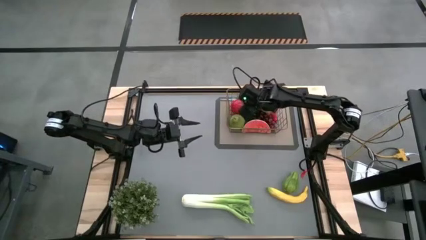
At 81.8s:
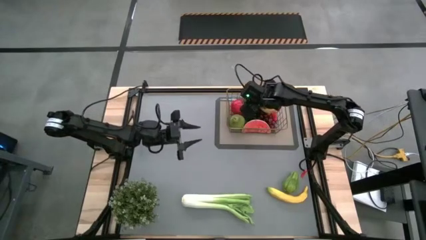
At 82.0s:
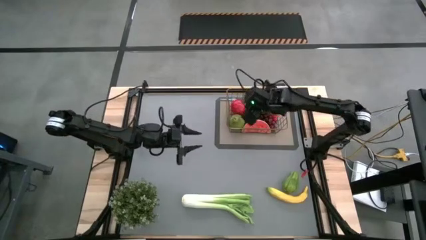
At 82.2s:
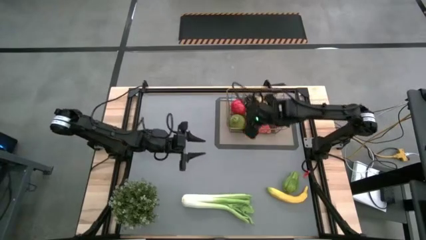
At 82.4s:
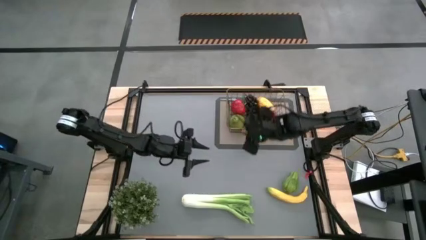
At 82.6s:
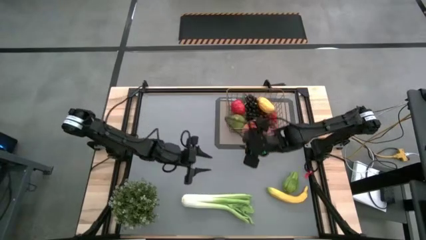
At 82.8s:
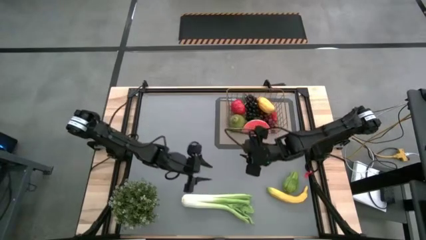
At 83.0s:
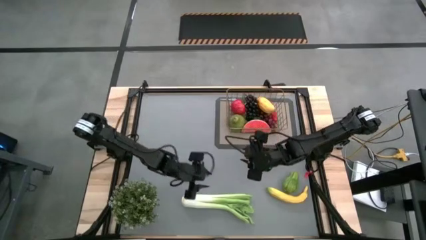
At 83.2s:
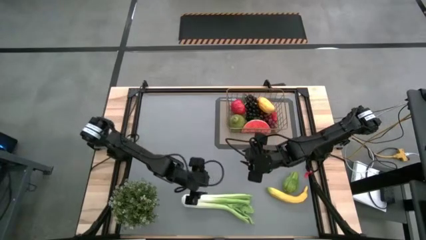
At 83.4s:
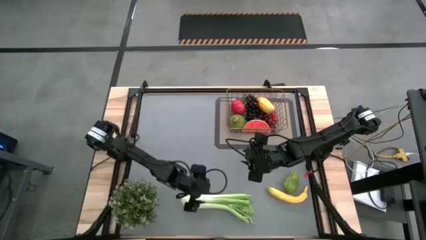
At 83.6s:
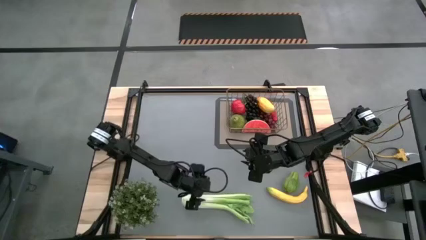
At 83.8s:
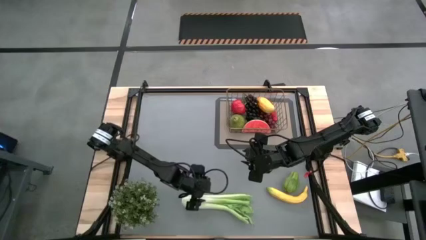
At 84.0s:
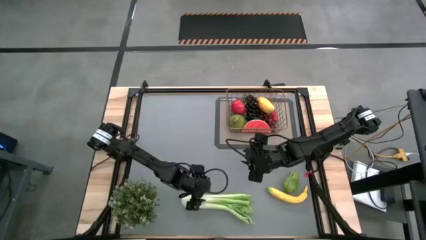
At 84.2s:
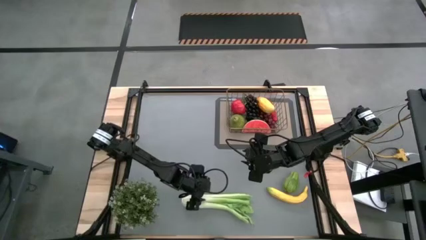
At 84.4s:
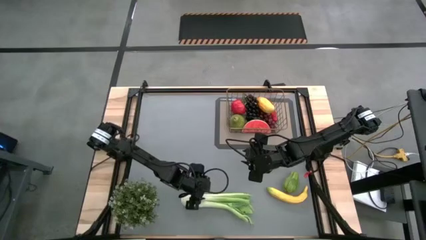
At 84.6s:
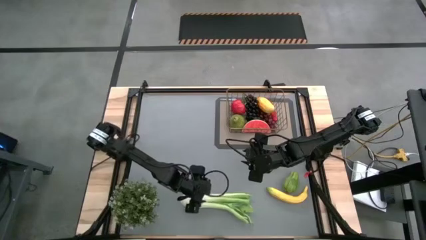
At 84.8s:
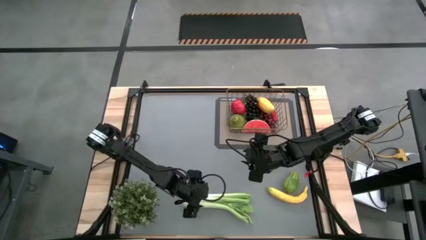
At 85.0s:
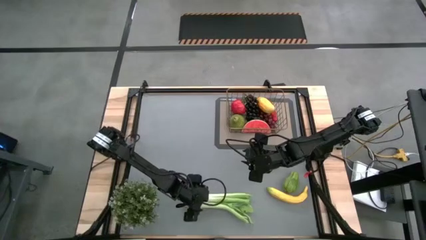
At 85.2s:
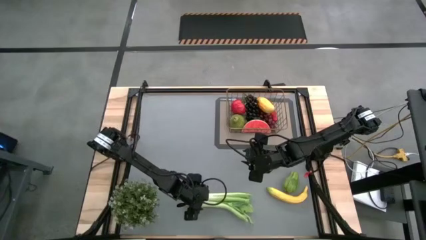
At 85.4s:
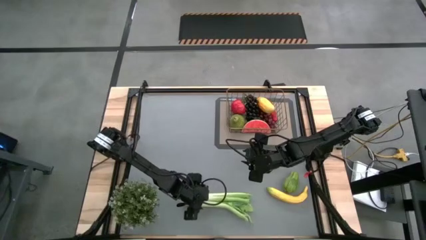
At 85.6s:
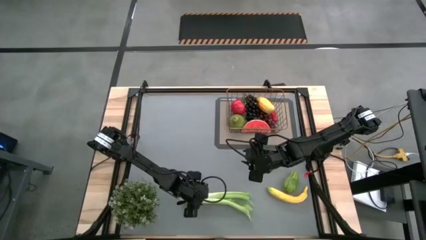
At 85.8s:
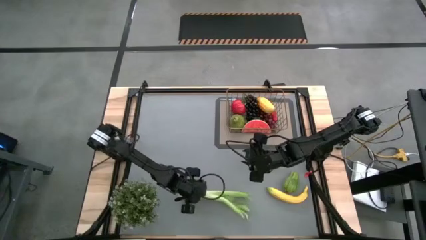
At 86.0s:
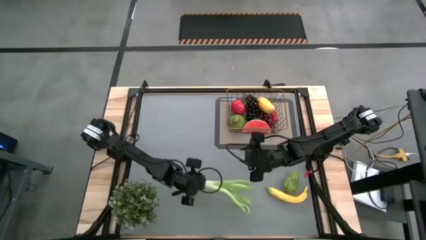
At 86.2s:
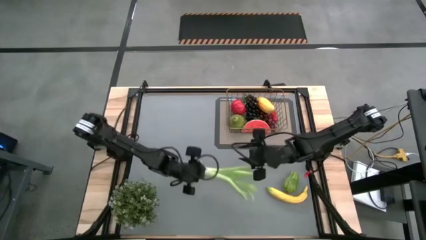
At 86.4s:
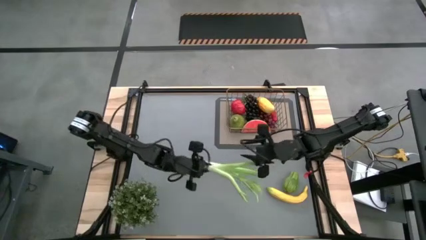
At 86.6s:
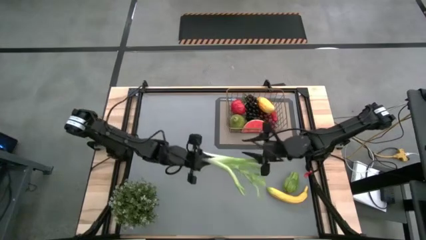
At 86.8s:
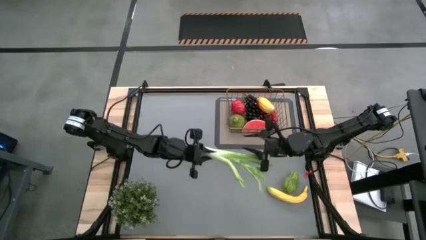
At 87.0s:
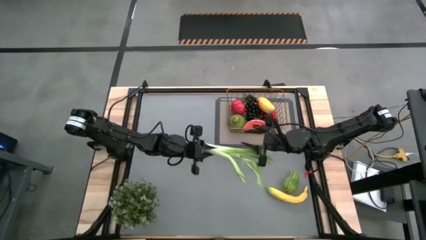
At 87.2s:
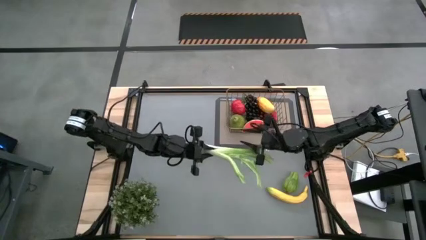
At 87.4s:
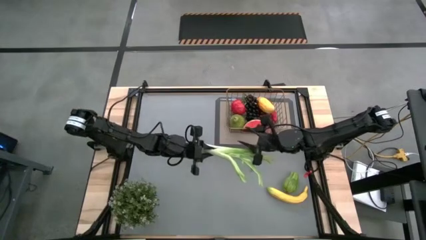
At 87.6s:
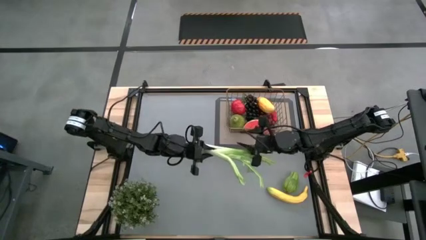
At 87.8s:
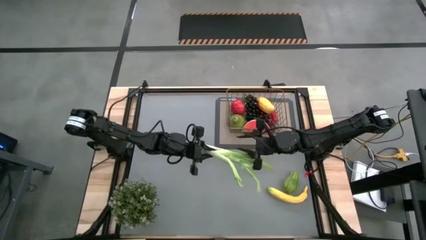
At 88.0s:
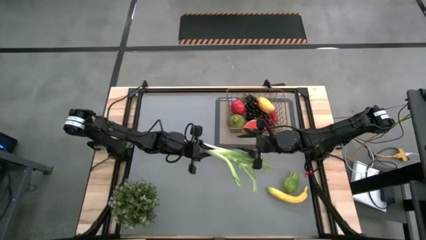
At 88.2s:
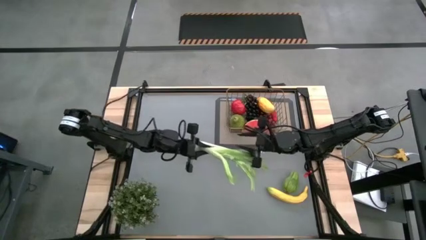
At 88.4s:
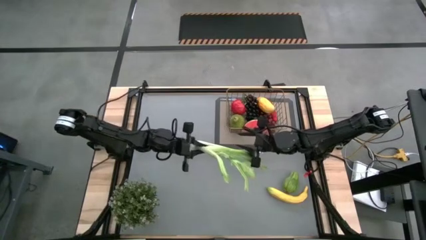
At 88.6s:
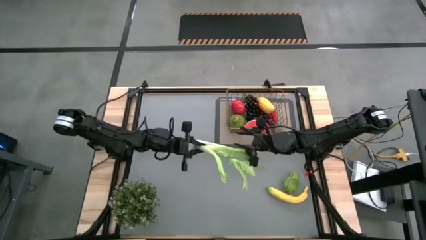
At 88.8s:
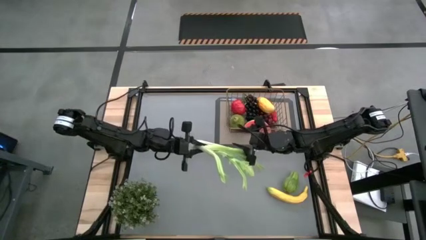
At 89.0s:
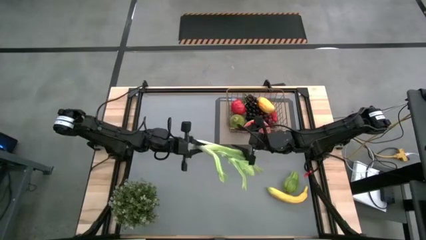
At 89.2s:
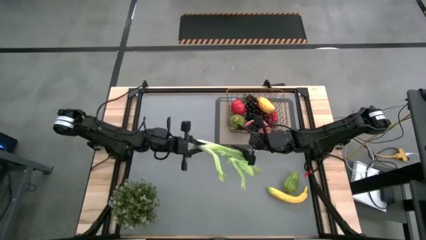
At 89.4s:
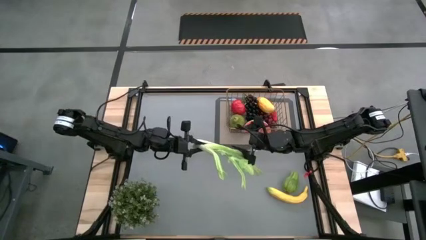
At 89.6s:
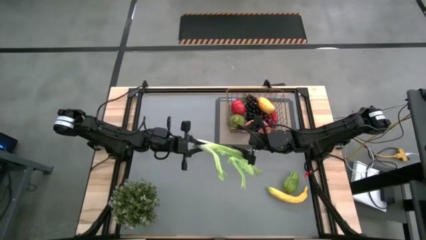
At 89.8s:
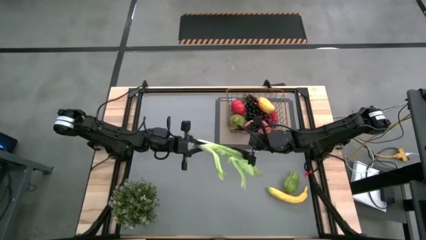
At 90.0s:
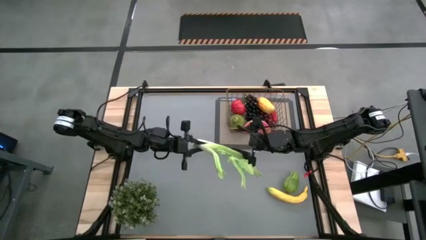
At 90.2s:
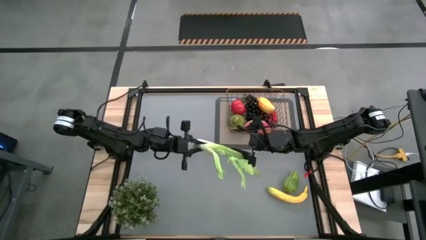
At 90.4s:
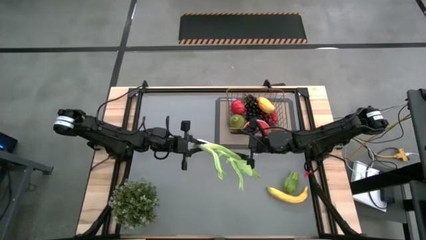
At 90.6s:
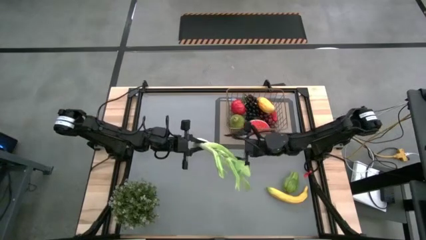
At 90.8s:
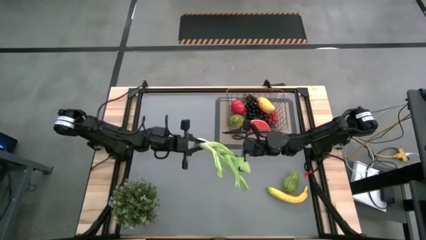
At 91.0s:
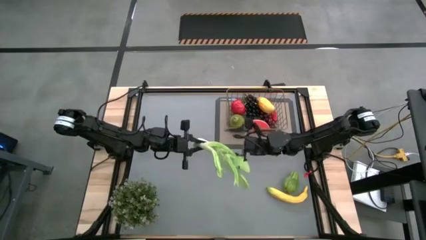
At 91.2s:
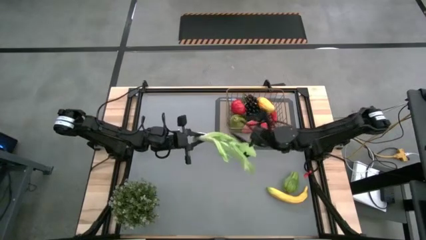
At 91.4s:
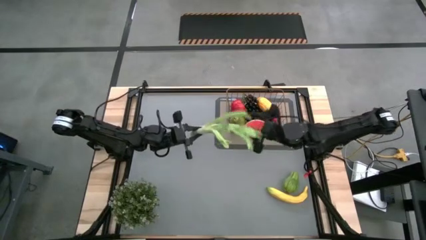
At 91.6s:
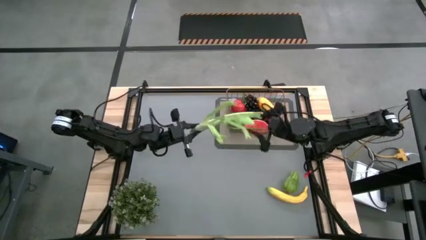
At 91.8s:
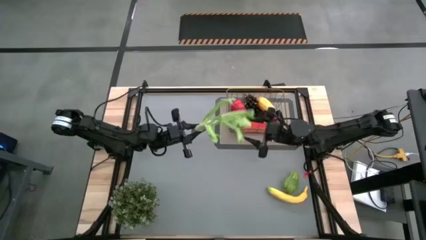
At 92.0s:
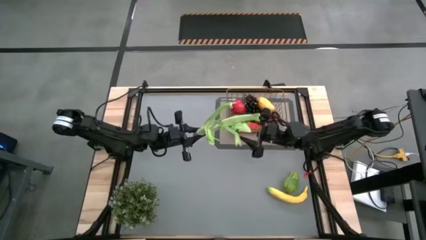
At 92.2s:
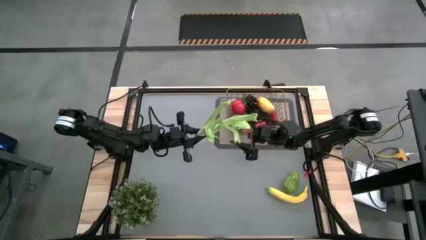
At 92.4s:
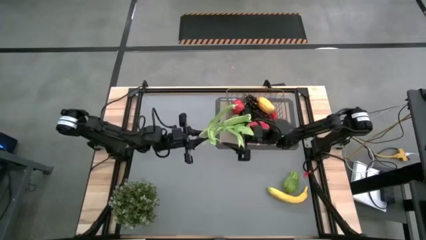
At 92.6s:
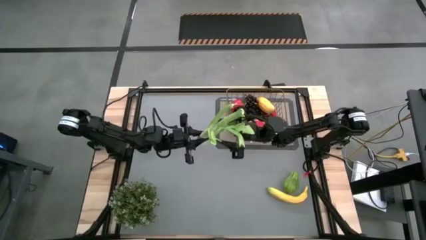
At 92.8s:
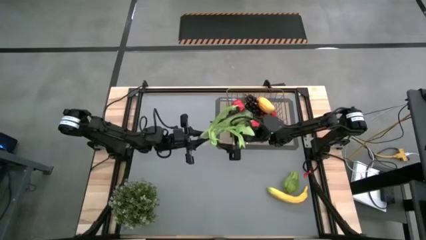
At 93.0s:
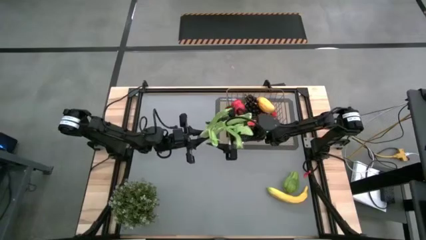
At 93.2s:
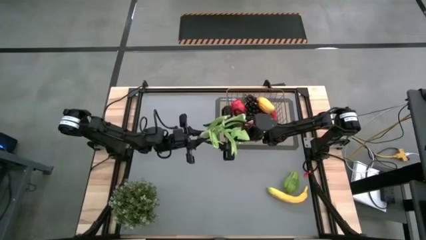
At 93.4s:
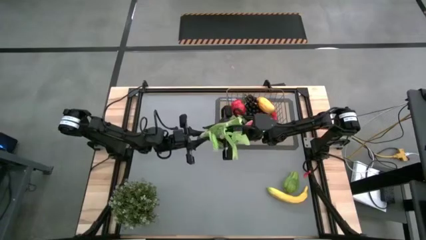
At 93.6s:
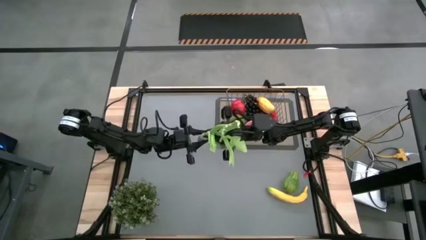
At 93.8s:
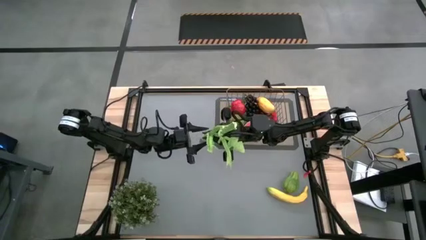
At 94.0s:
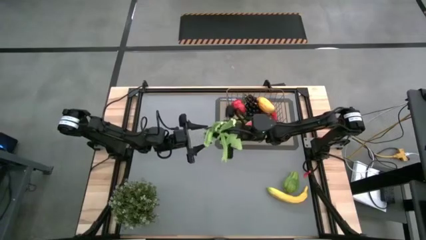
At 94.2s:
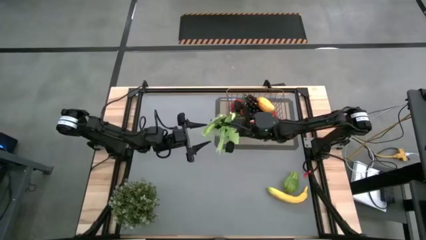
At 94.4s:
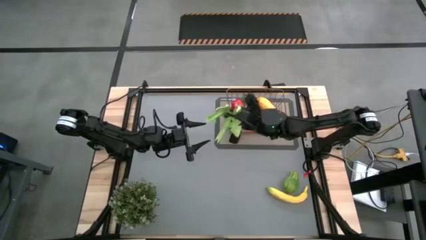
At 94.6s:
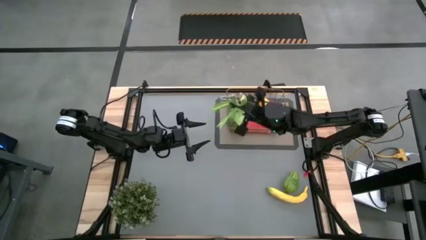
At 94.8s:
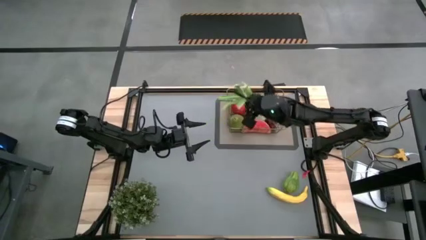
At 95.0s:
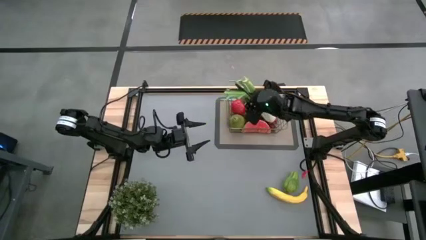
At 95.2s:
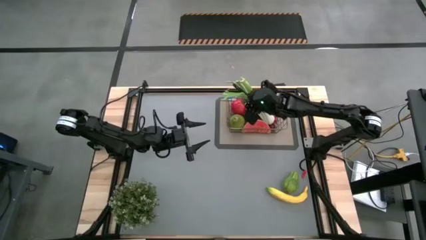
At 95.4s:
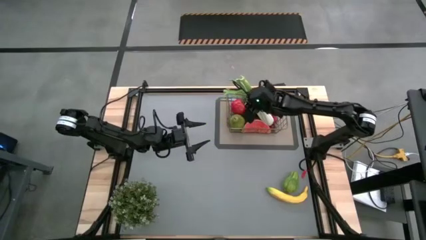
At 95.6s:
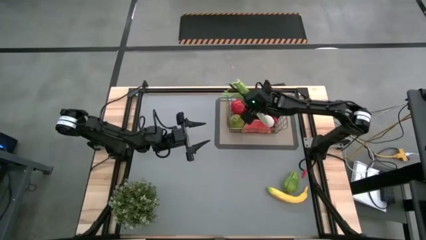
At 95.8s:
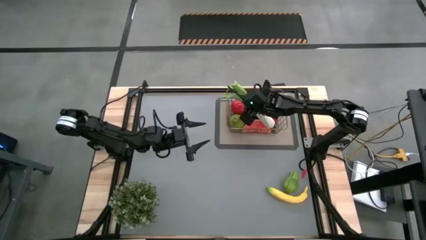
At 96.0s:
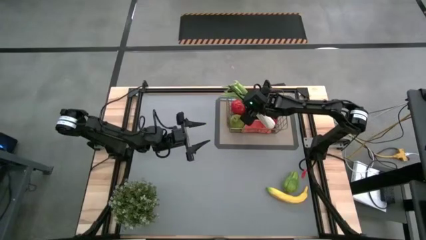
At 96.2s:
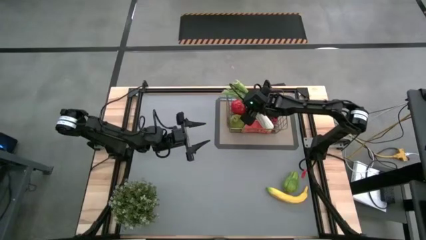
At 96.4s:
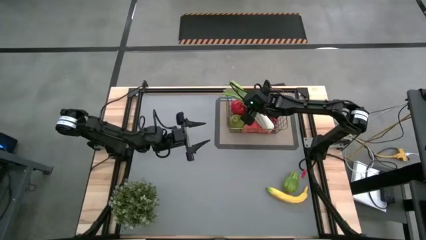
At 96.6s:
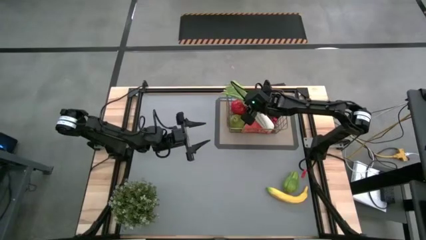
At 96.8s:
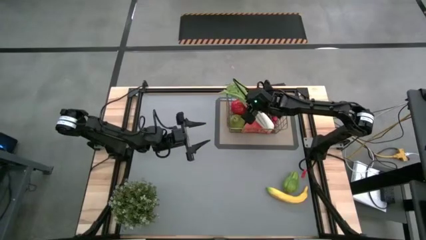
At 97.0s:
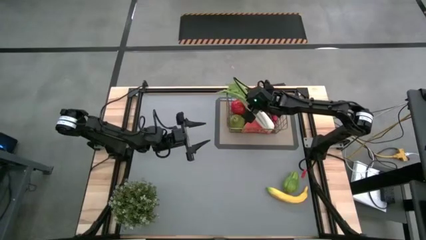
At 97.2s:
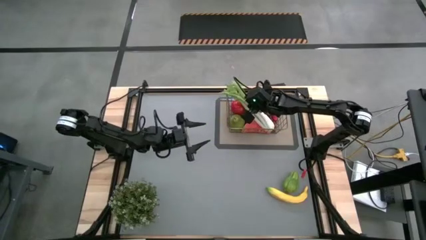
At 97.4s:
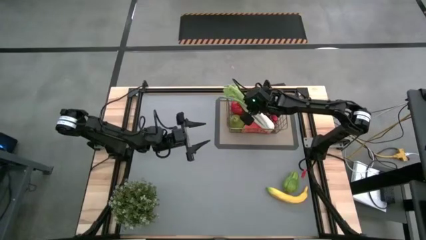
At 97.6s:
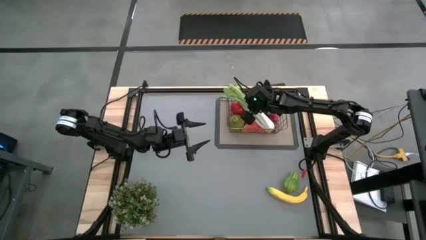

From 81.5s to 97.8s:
Task: Build produce basket
Put the celery into the wire basket
